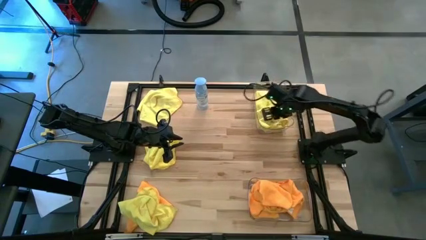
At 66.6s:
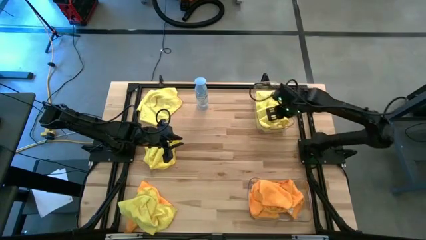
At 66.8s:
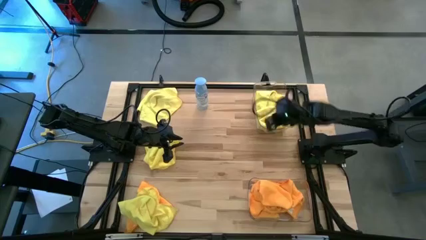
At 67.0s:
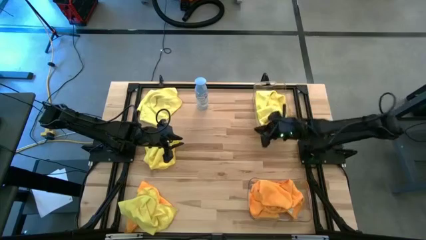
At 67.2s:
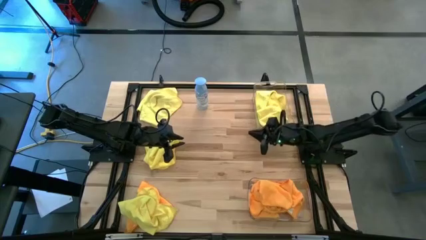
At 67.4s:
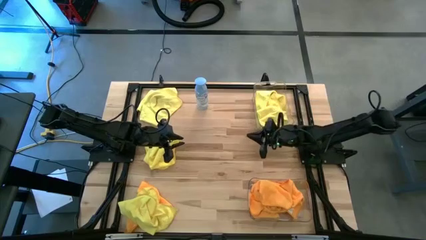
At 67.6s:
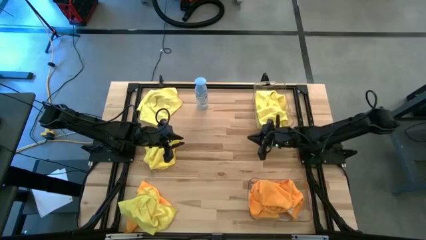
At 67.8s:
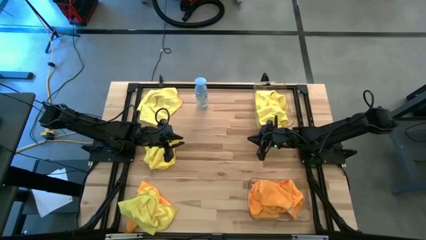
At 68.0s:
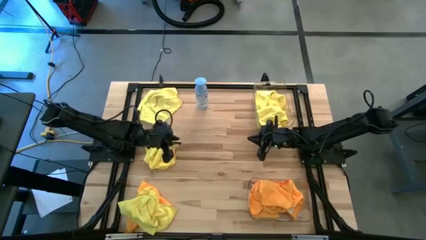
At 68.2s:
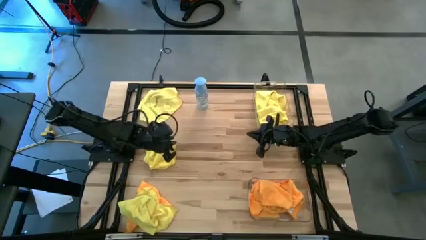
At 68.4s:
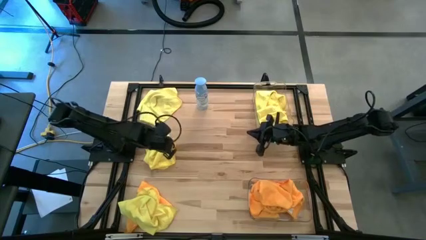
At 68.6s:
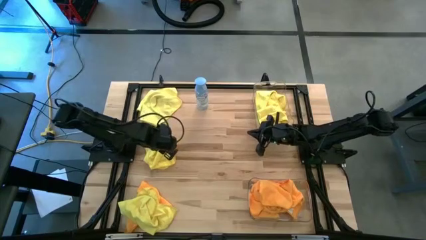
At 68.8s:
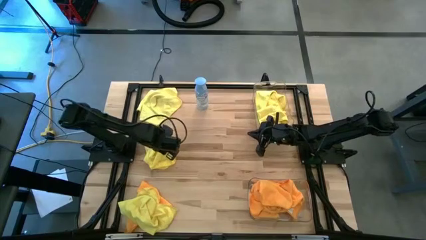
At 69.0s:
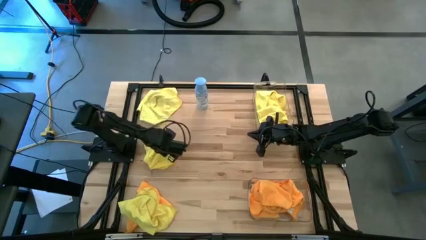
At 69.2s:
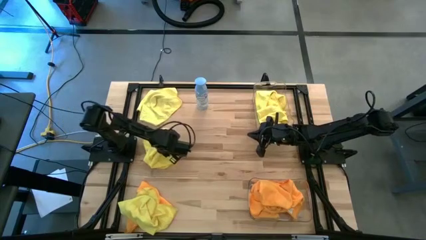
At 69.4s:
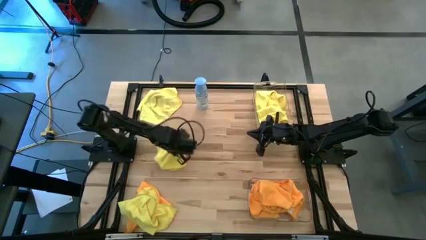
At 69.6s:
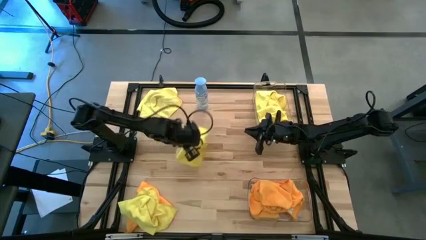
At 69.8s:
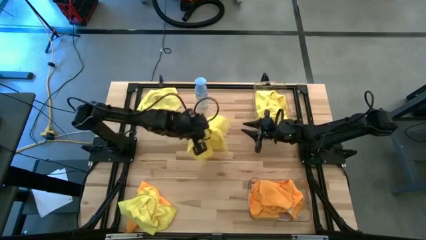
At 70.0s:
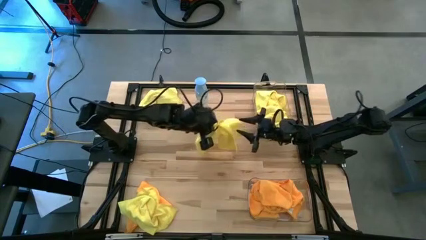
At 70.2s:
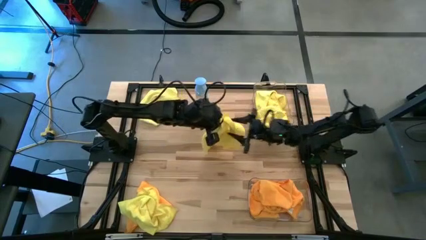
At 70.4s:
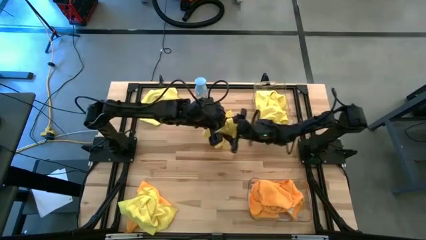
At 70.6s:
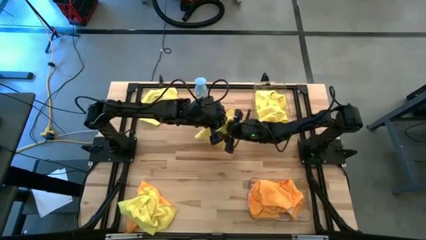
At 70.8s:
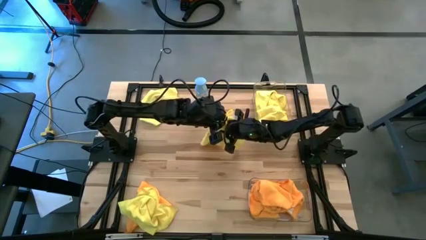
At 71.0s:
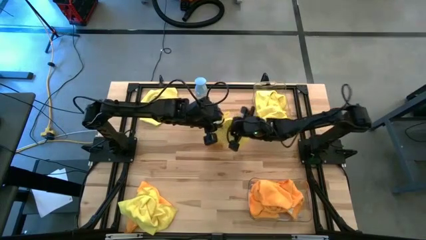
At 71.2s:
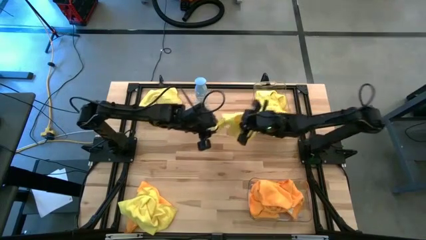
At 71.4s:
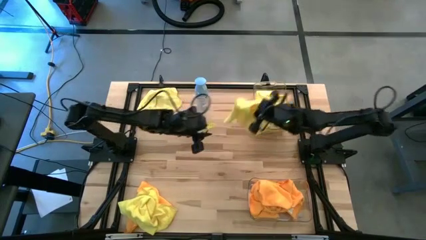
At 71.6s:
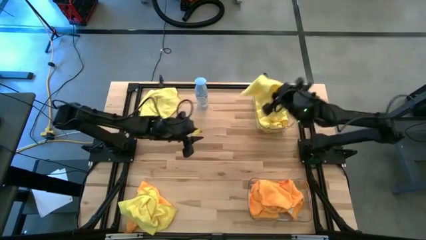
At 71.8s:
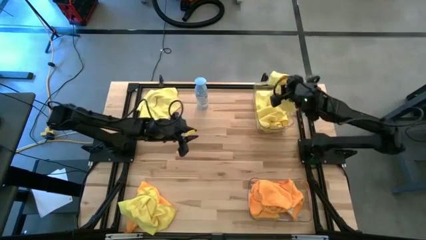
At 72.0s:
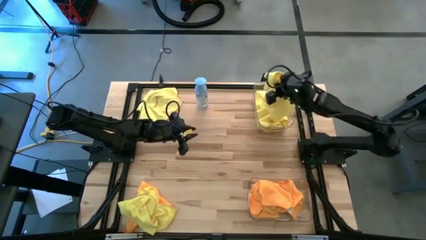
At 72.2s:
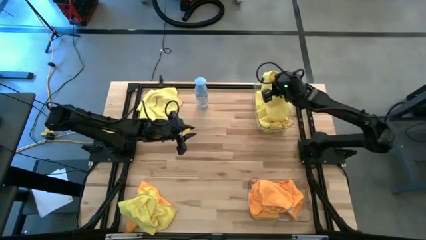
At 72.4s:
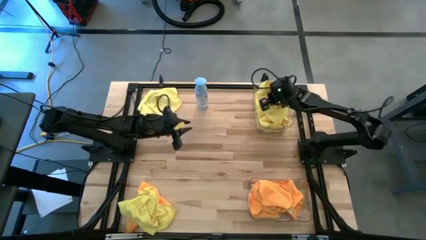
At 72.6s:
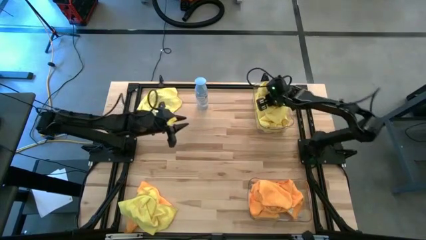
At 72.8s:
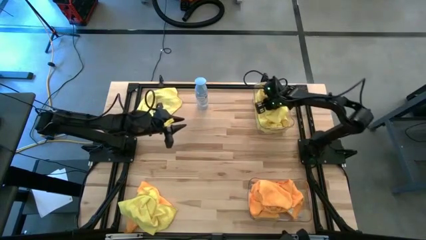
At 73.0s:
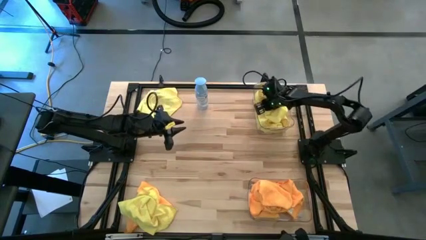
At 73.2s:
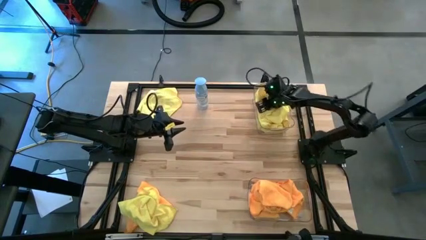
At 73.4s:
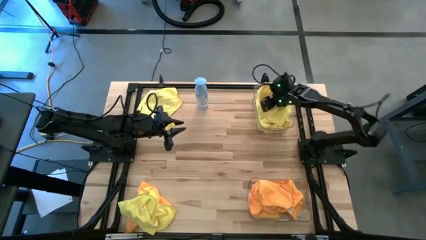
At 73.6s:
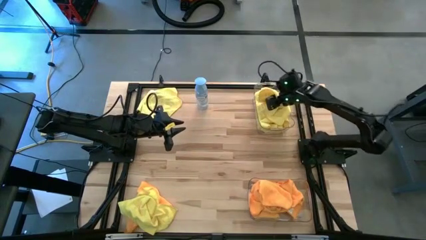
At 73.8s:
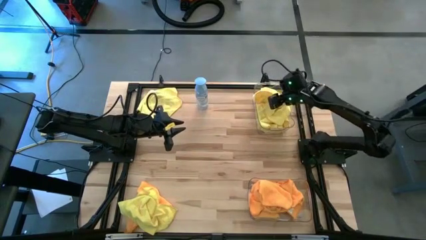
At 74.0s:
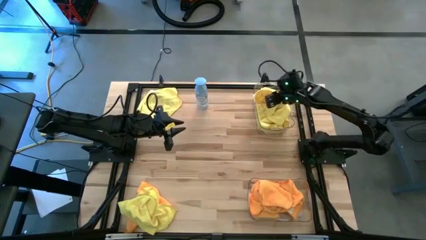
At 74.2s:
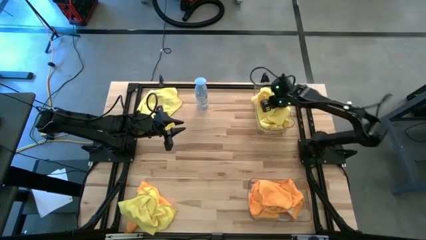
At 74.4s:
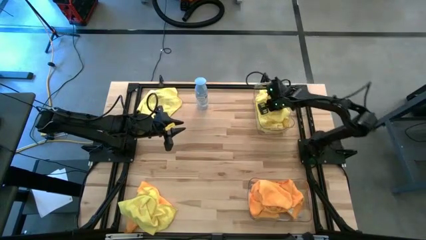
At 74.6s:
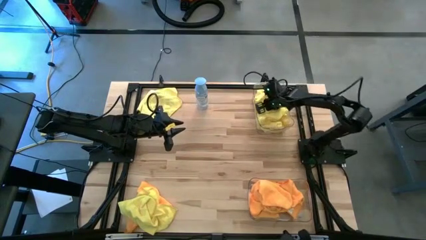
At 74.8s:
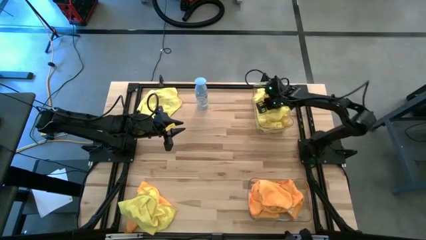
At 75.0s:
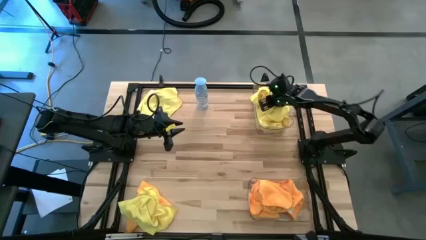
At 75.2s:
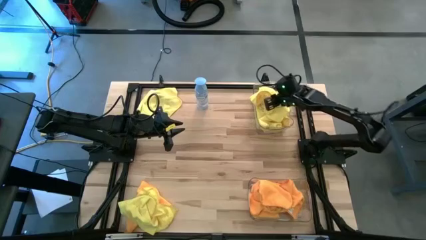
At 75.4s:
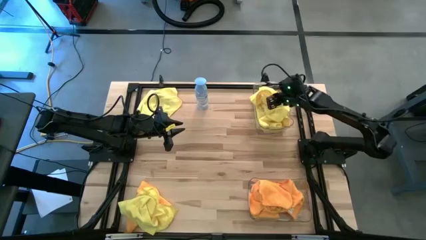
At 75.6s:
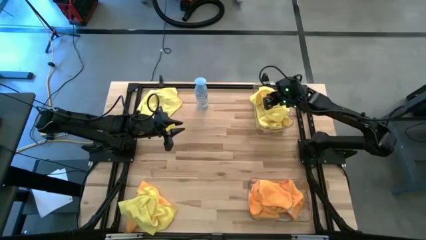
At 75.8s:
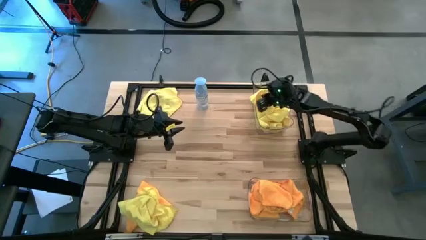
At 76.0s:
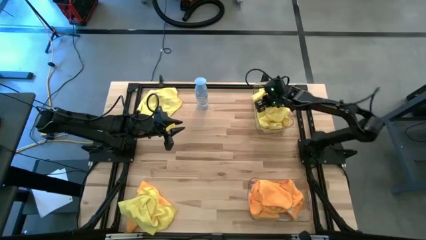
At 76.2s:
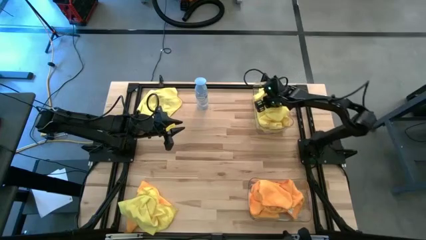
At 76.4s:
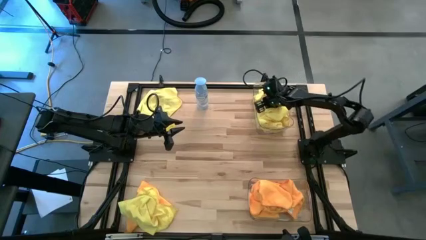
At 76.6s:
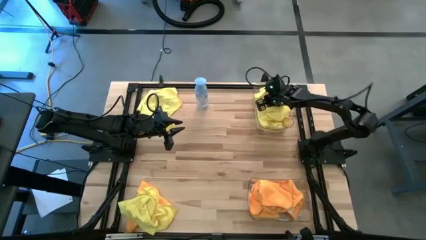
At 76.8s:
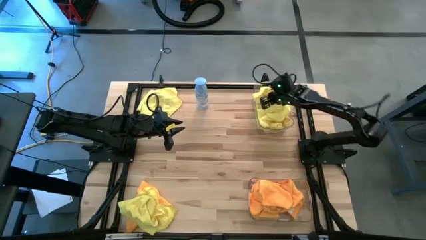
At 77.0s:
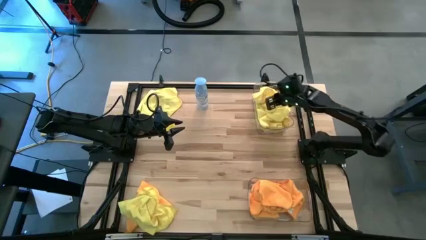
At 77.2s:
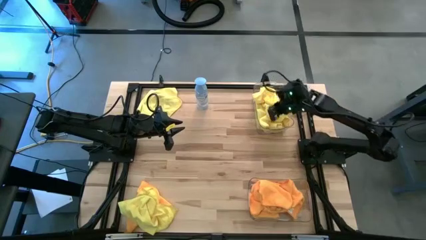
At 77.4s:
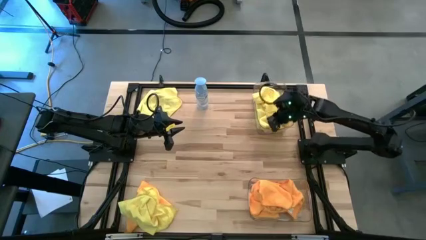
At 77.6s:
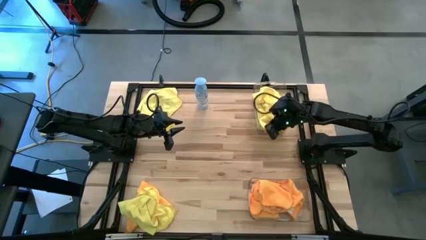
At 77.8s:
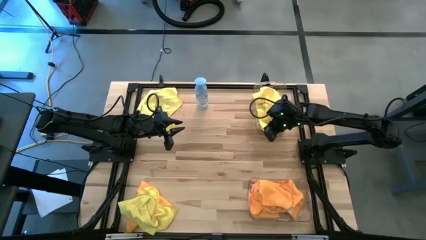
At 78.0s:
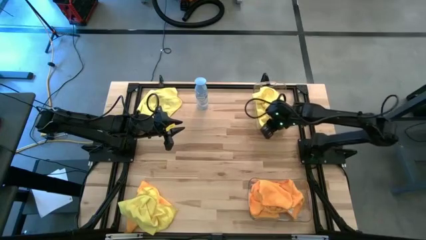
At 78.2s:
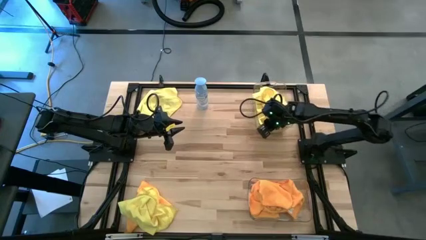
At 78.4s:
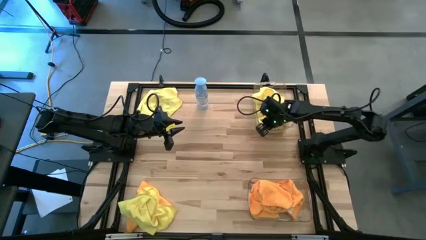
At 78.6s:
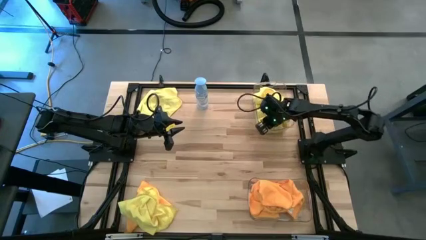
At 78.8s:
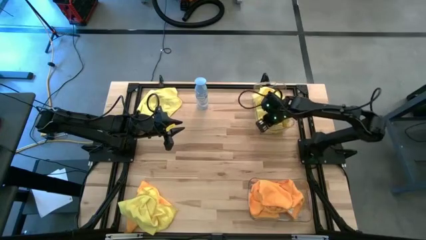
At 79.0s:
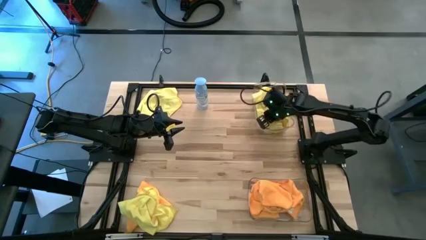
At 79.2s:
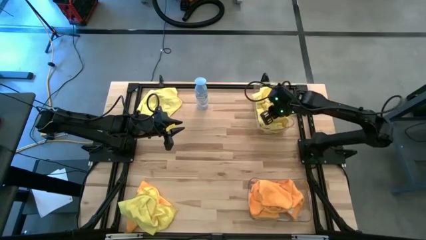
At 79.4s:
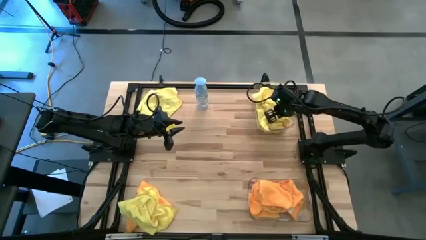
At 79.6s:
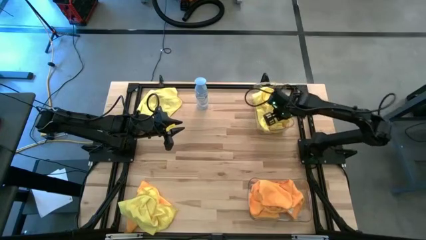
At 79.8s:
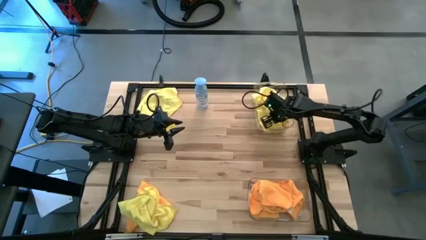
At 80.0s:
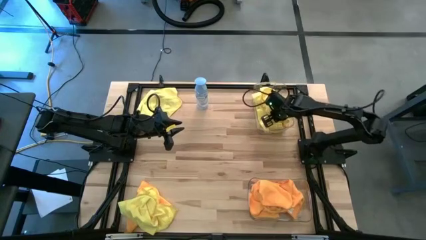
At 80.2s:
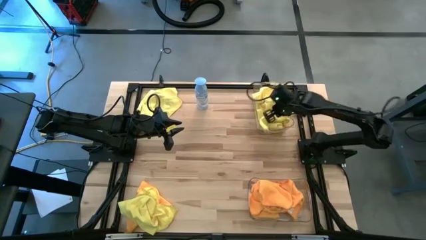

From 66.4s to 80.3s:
Task: Sort microfiber towel by color & place in baskets
Put the yellow microfiber cloth into the top transparent bin

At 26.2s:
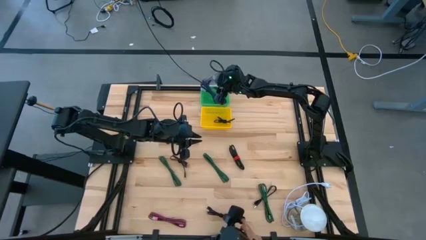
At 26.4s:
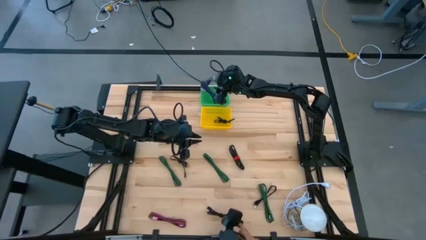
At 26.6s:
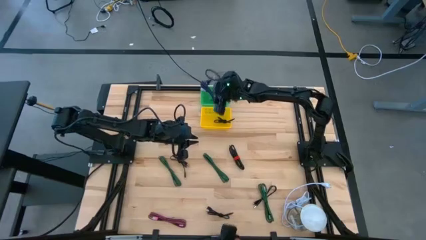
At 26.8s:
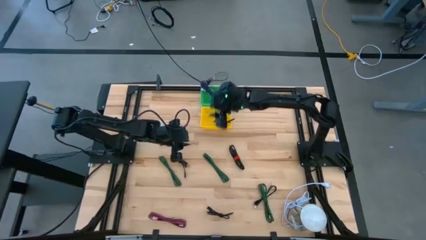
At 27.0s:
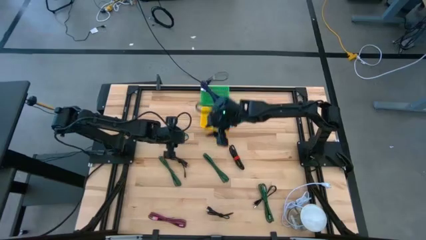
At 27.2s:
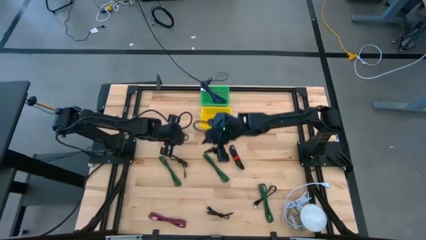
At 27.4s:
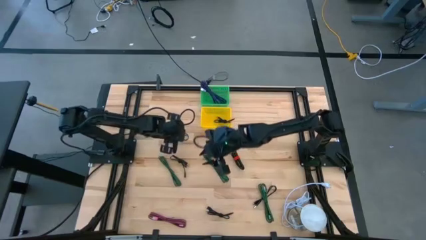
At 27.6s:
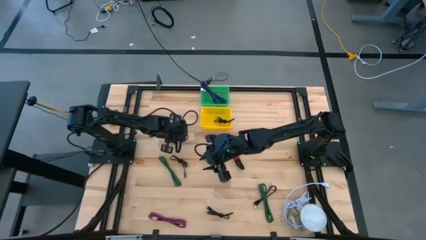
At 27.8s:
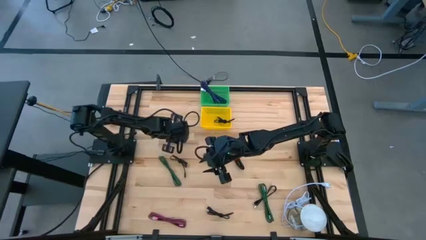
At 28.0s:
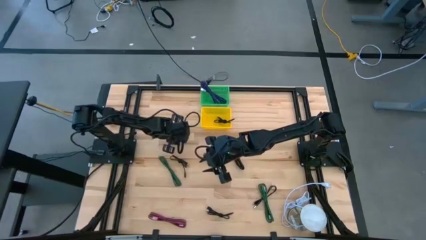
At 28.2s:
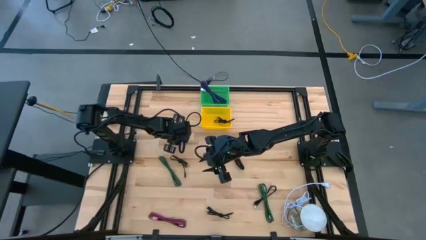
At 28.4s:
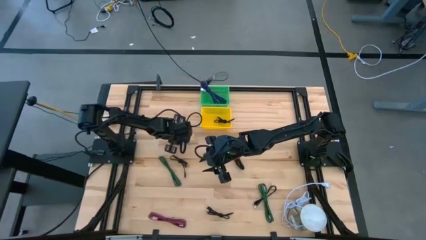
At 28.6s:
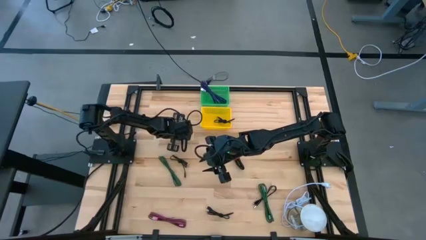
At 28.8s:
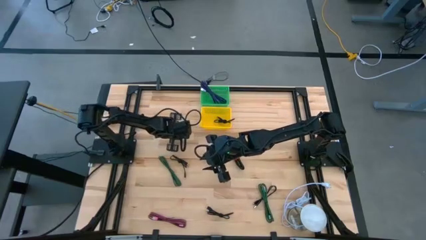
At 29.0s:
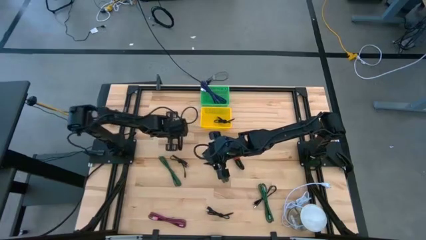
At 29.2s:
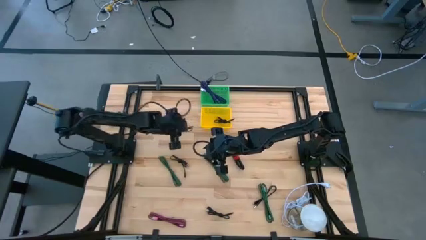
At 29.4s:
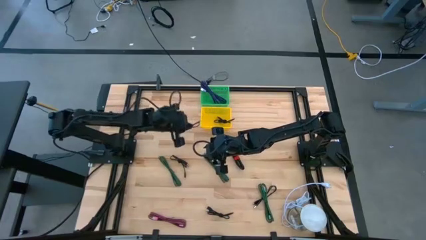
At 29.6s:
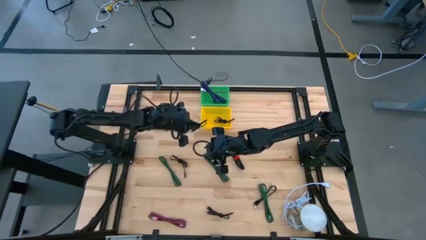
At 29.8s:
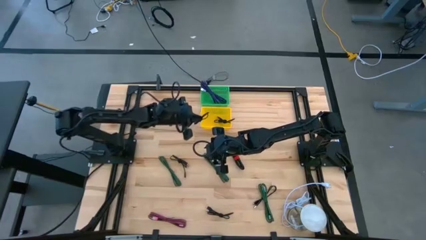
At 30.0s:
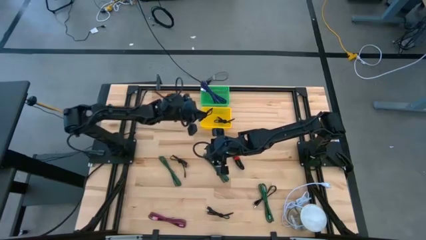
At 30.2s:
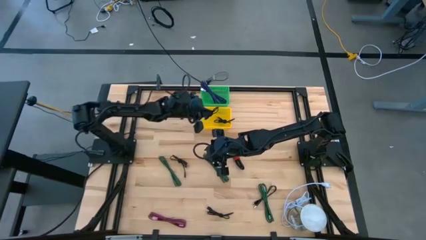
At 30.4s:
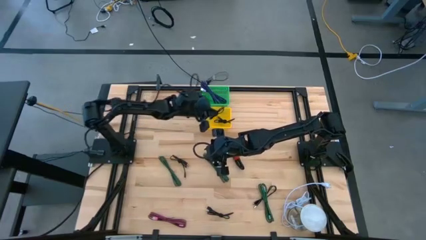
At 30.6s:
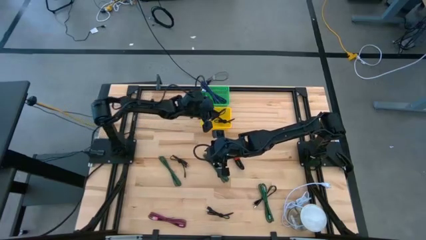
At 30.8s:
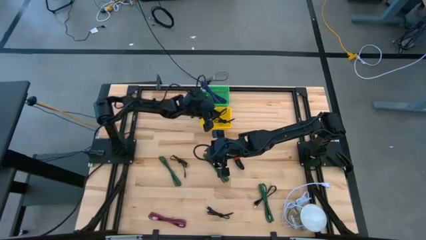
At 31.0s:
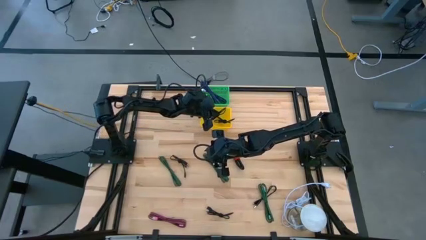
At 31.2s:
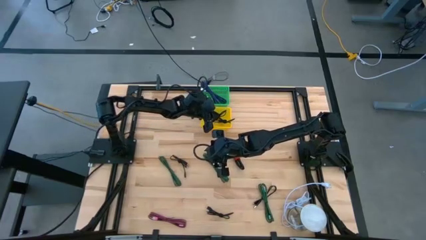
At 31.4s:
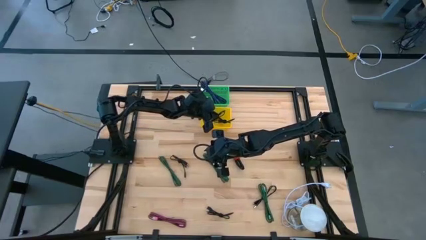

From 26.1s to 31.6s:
Task: Pick & Place USB Port
Put the black charger cable into the yellow basket
